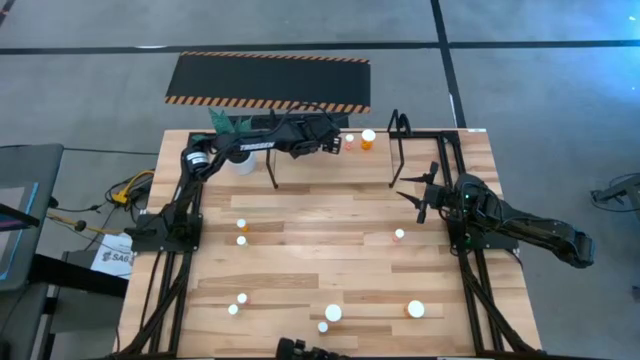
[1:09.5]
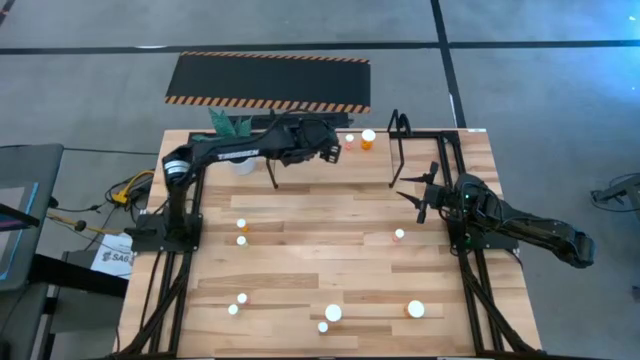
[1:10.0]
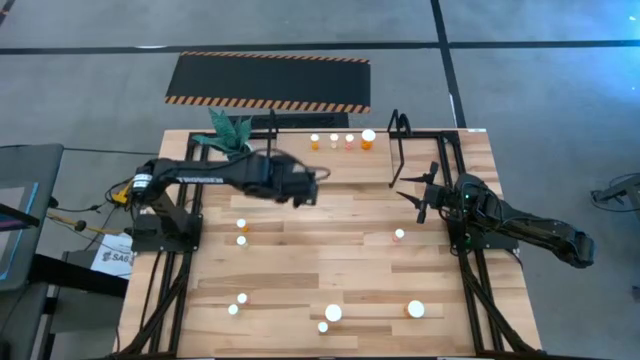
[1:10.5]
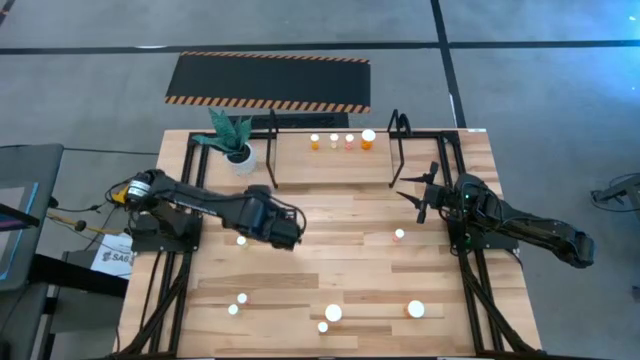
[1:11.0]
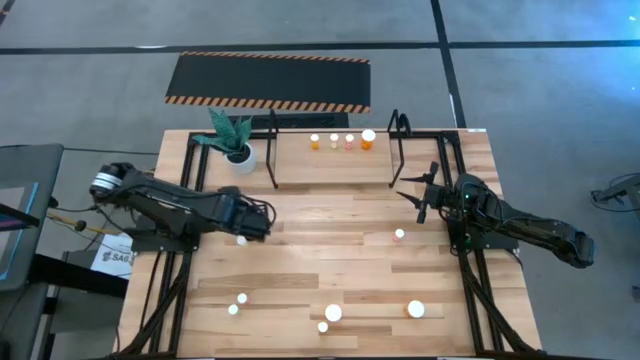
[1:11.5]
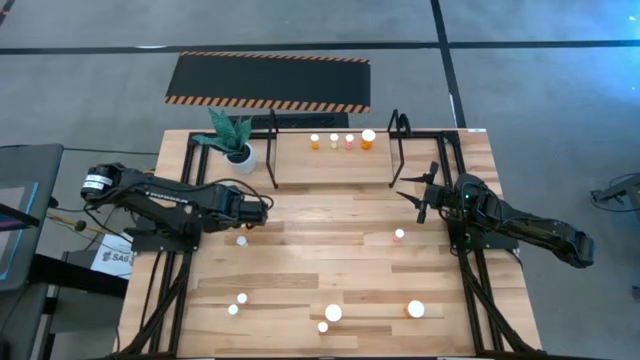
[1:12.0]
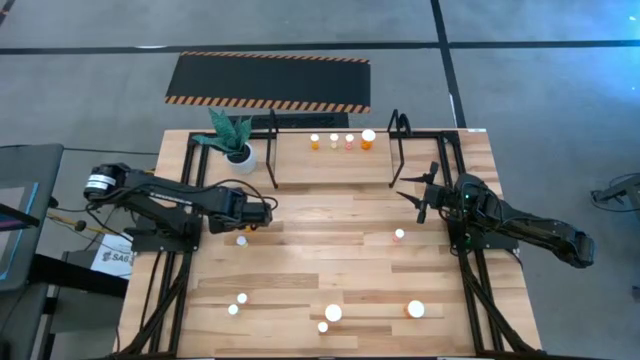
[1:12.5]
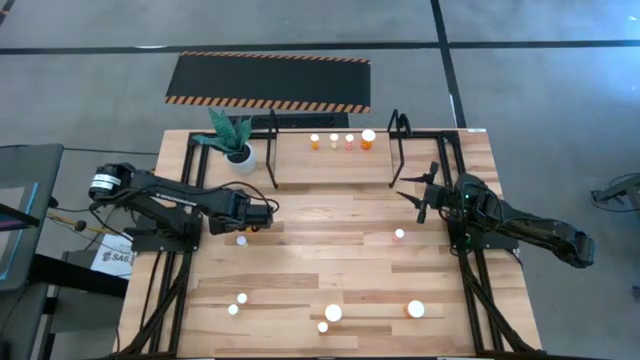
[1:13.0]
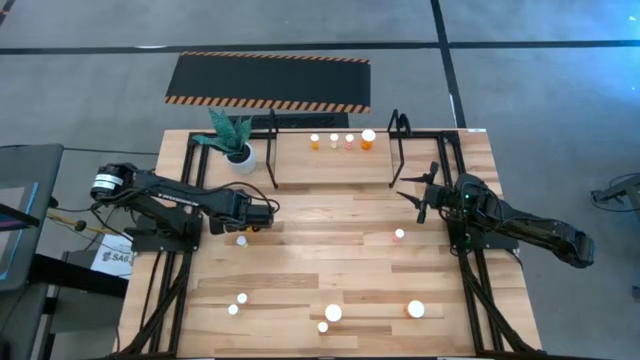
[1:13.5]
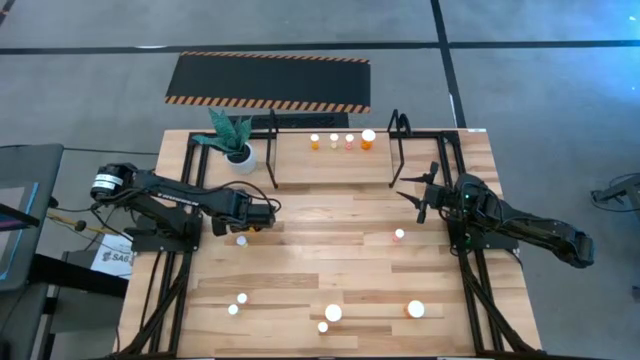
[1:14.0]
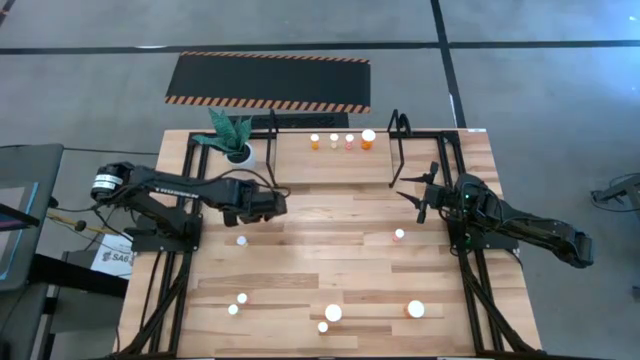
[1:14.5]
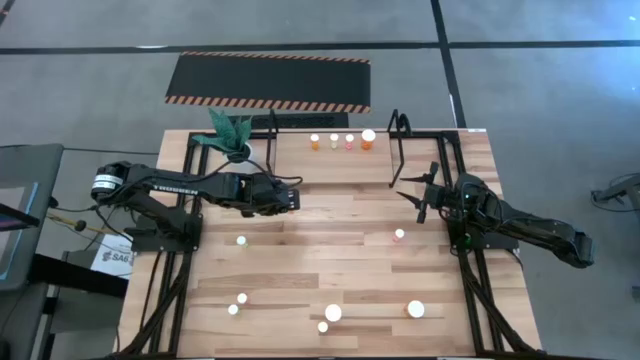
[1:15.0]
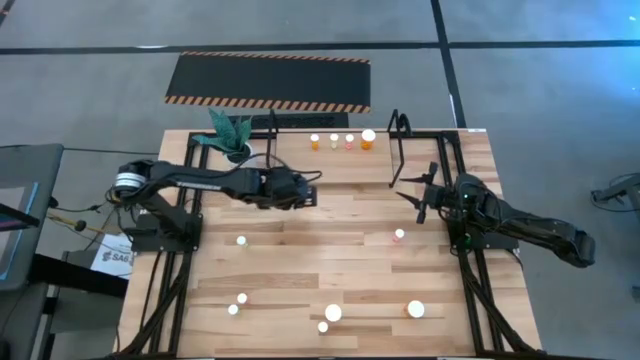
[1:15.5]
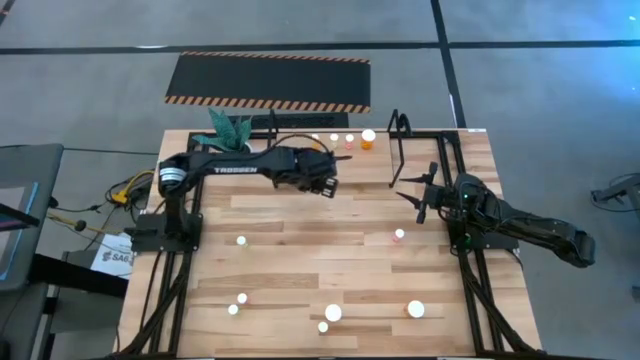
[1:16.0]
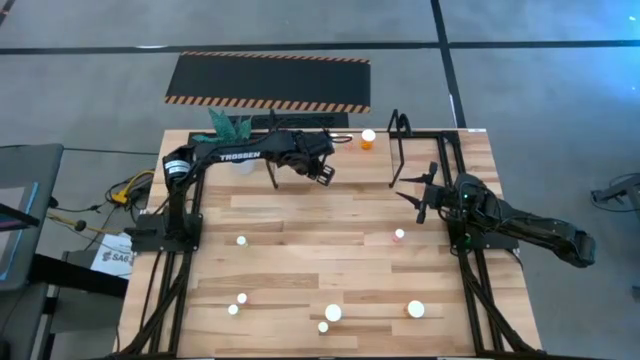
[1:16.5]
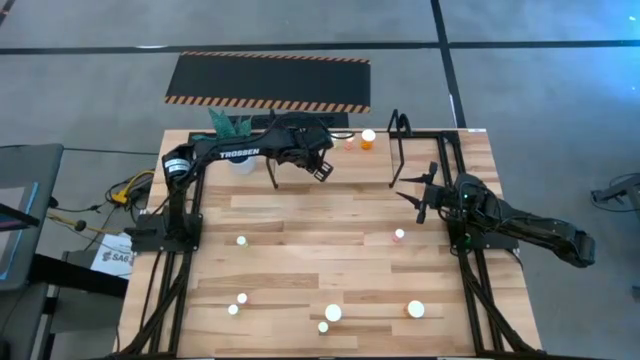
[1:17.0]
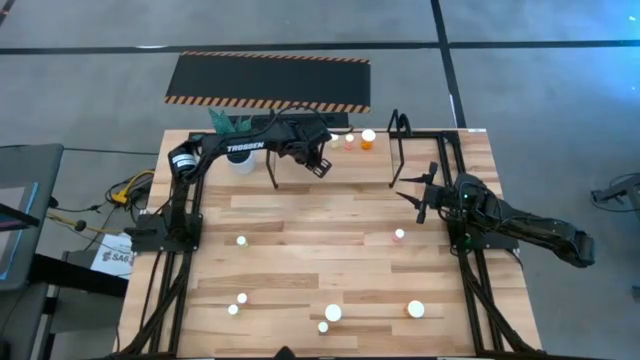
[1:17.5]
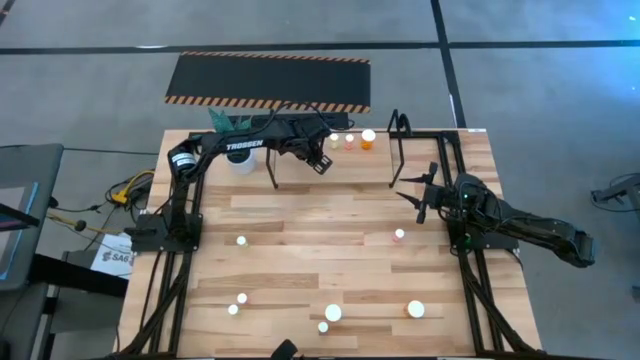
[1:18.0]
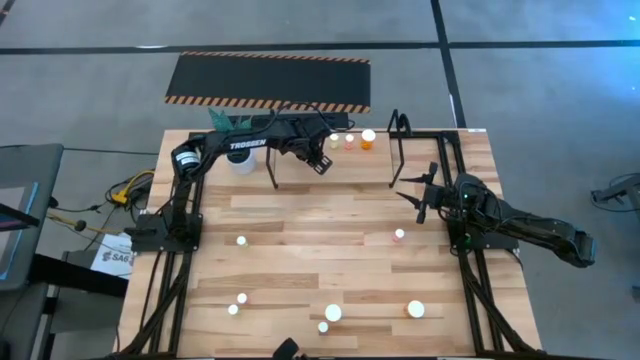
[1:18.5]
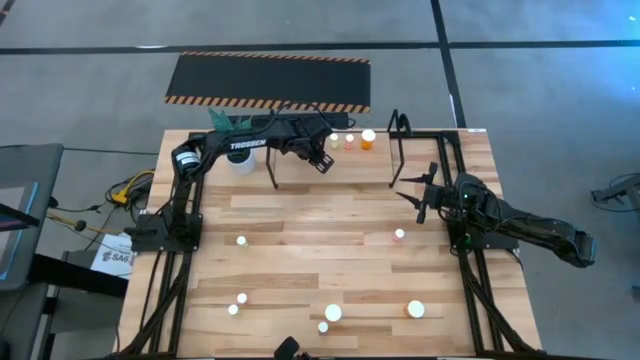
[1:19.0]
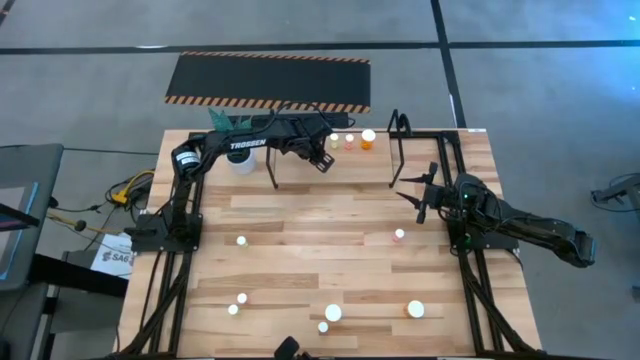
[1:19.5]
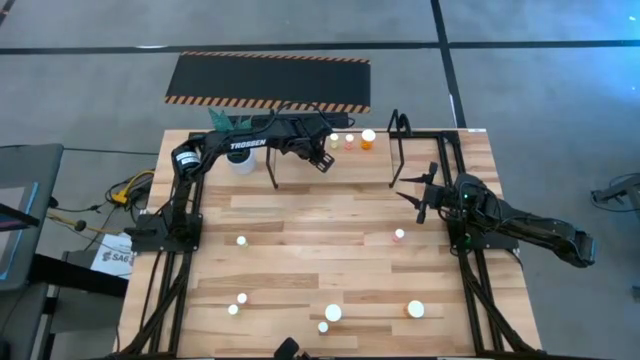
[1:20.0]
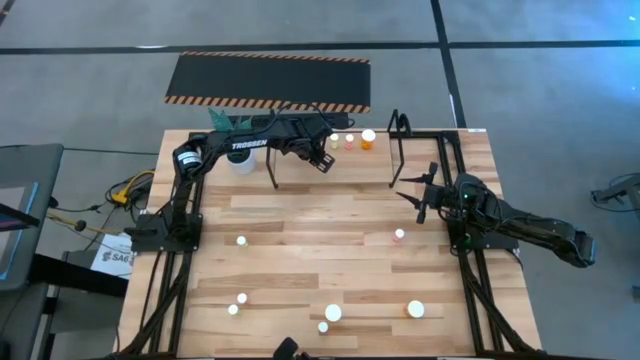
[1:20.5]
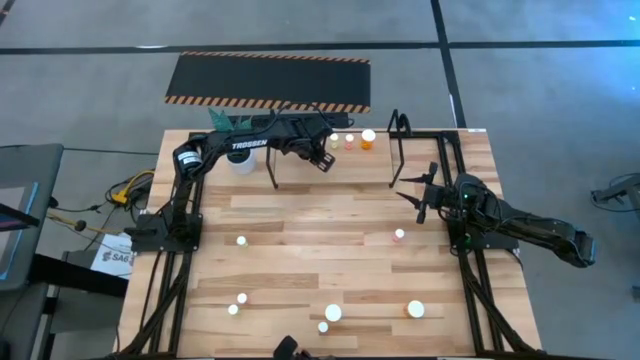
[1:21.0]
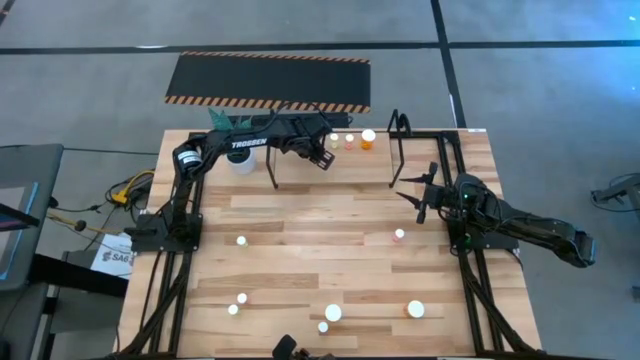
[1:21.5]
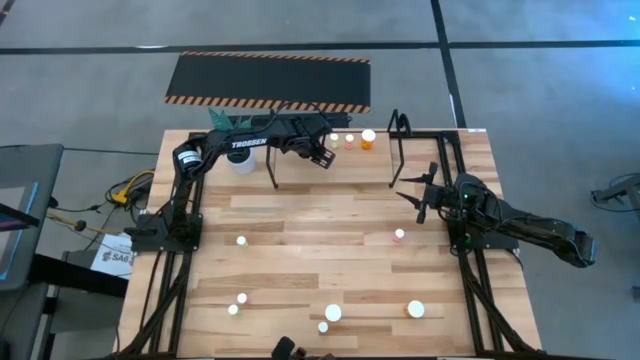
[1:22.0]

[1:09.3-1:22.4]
Task: Pick and place medicine bottles onto shelf by color
Put the top small orange pill bottle aligned with the other small orange pill bottle on the shelf

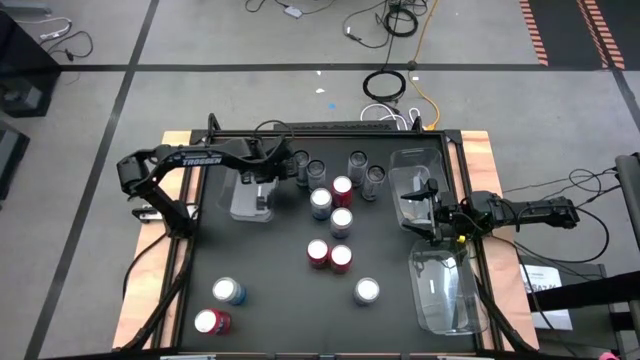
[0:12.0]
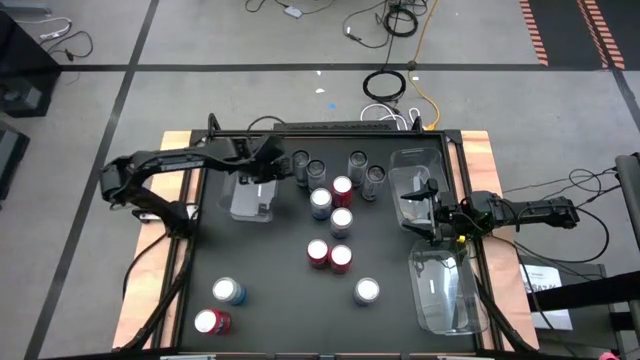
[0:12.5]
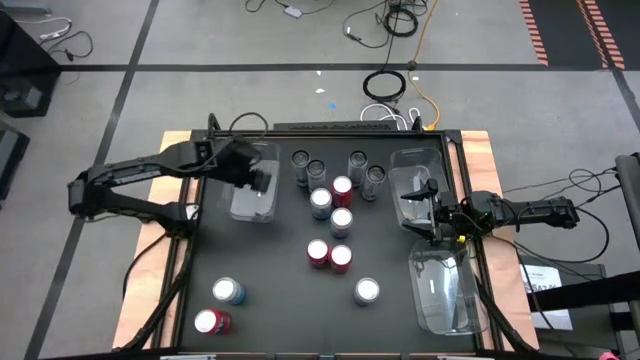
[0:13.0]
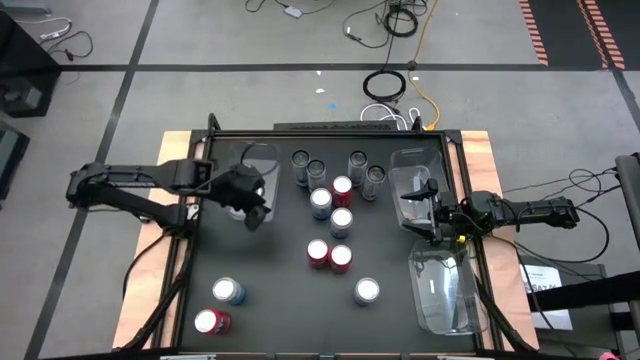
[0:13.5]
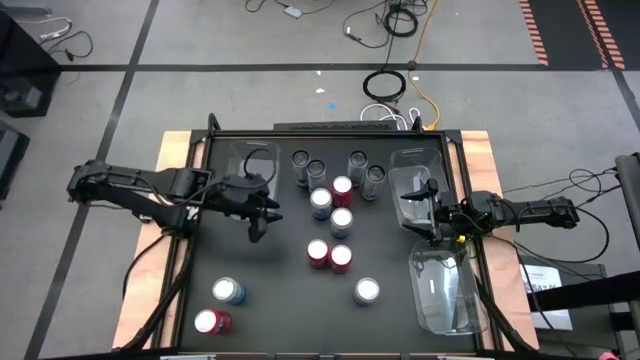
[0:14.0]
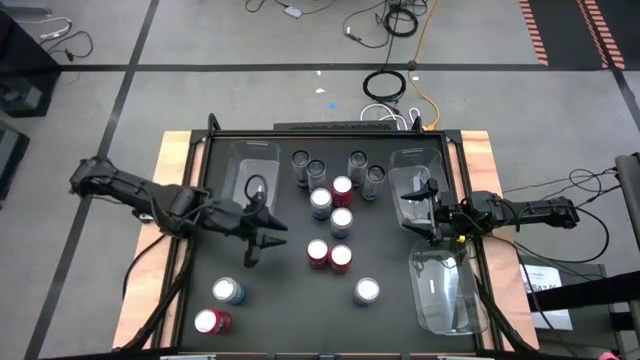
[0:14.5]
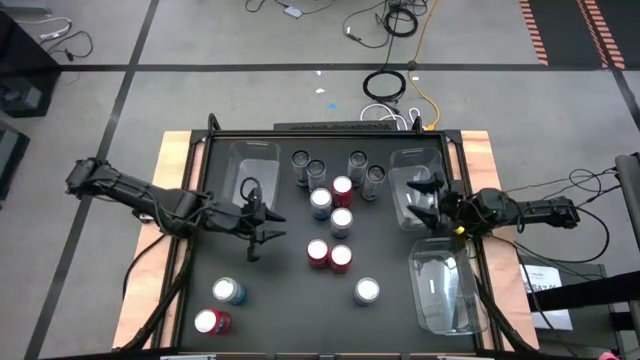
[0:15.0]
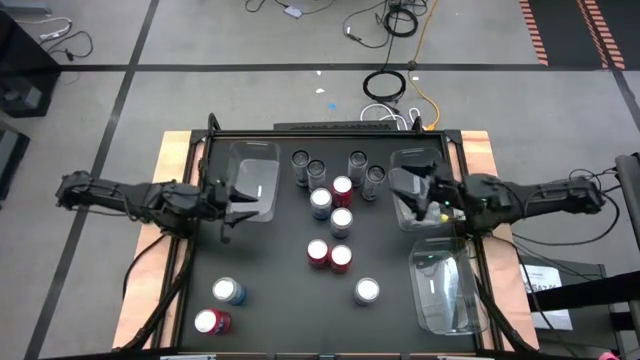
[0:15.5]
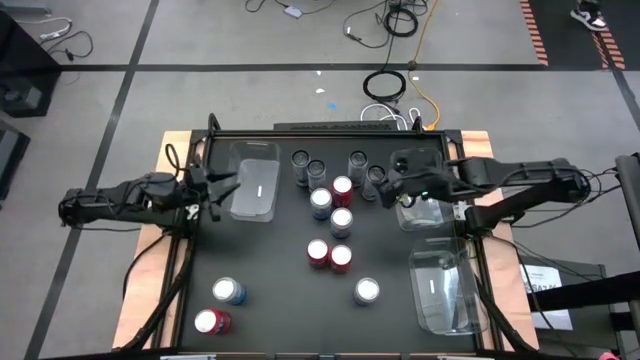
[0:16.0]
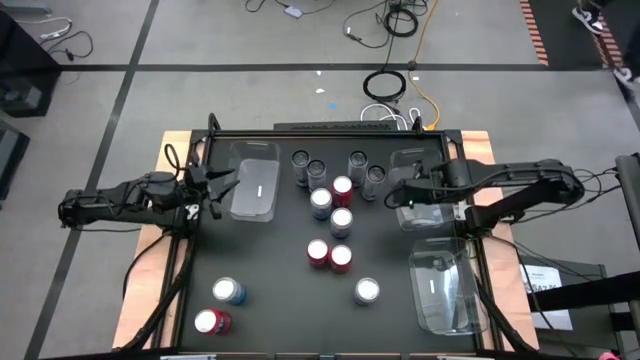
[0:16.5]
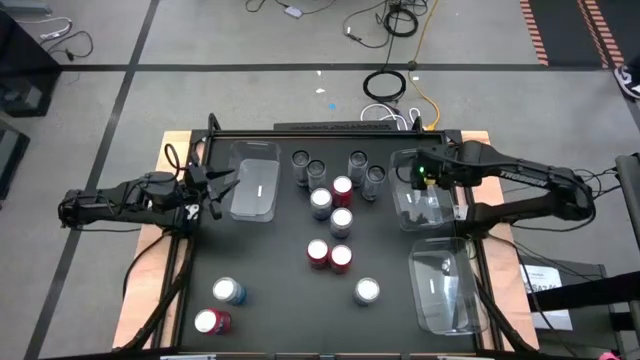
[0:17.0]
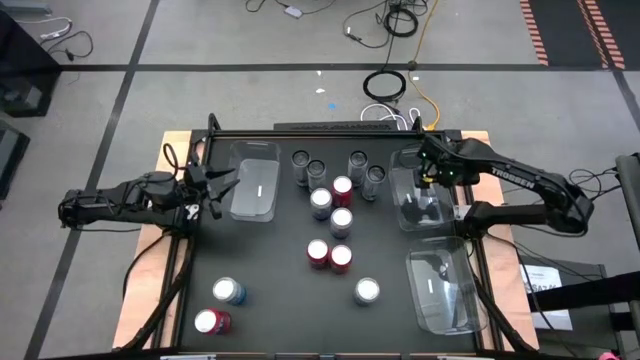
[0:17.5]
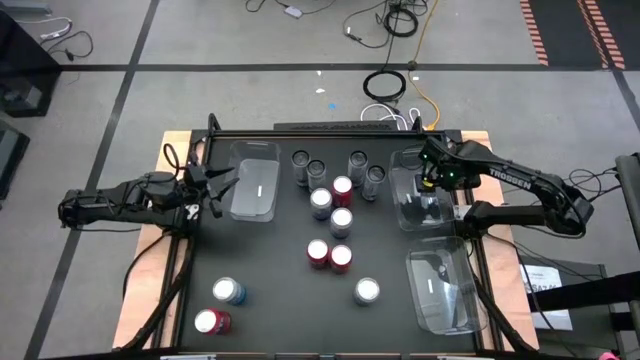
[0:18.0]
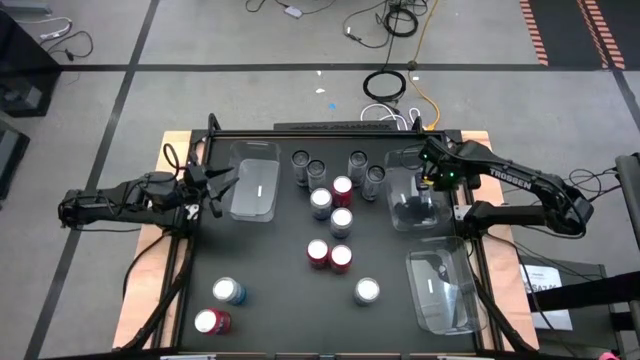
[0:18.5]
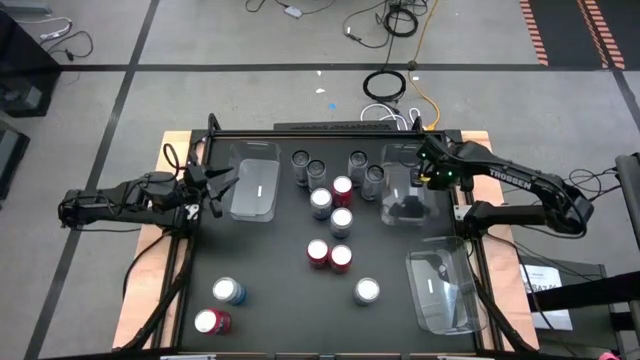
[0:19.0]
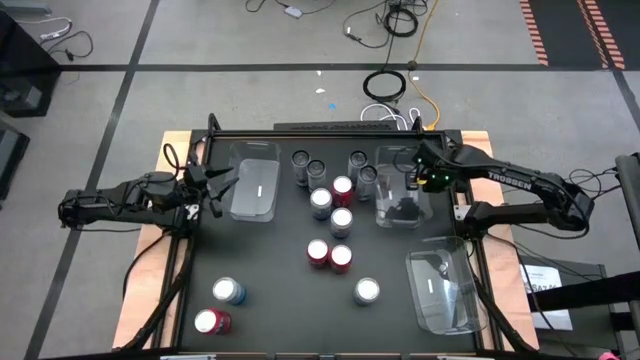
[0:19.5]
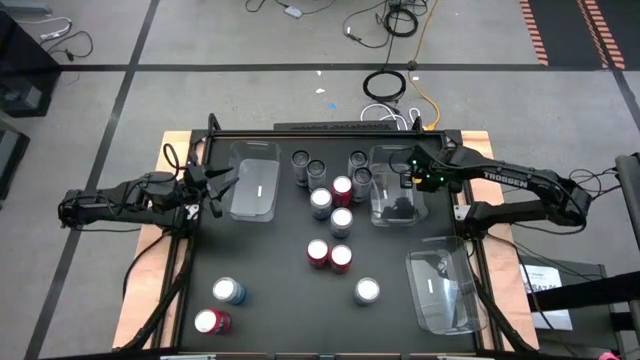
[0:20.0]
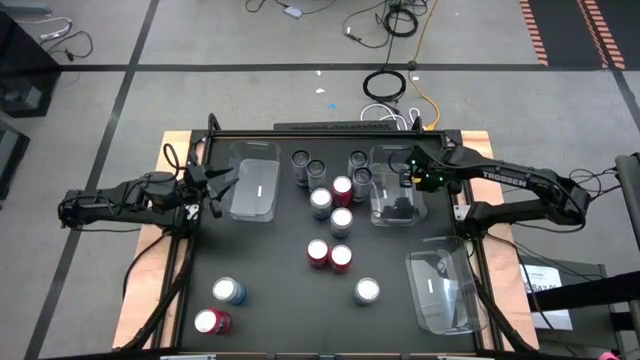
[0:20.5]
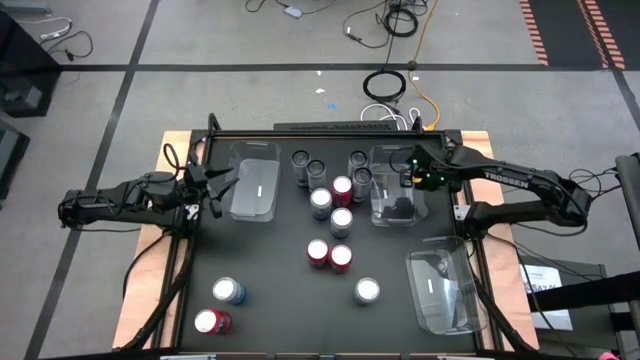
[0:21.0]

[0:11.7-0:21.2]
Task: Sort soda cans
Adjust the top right transparent bin
